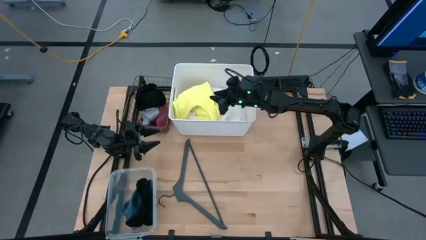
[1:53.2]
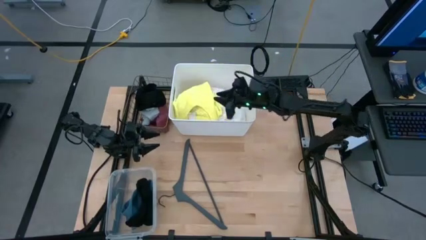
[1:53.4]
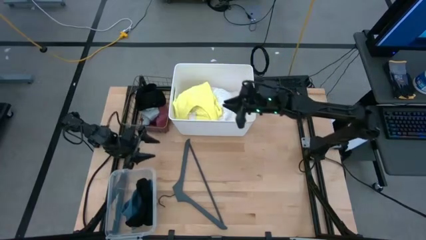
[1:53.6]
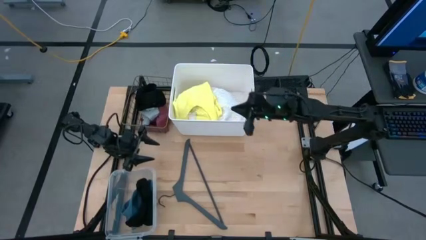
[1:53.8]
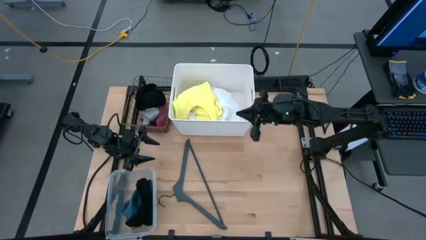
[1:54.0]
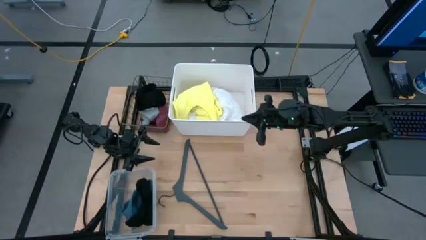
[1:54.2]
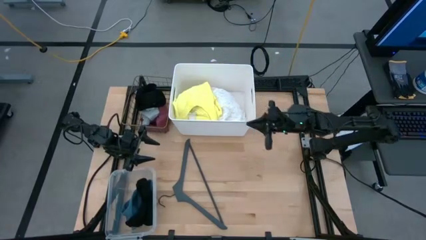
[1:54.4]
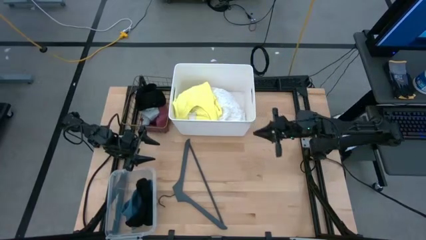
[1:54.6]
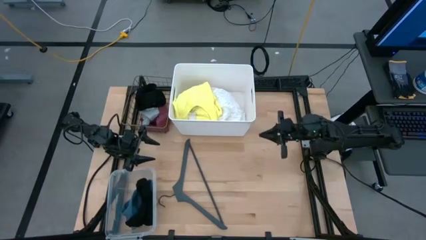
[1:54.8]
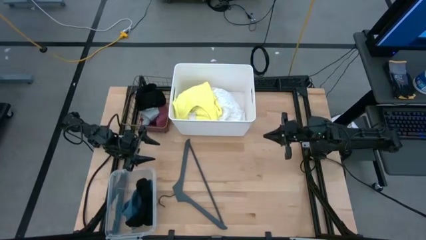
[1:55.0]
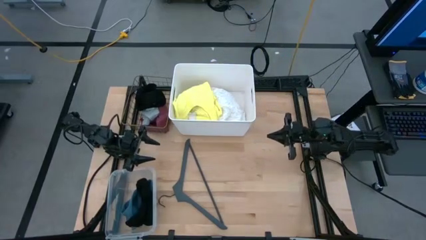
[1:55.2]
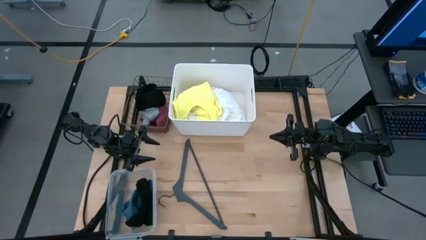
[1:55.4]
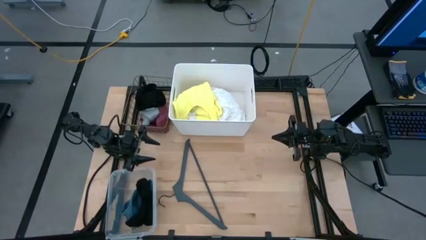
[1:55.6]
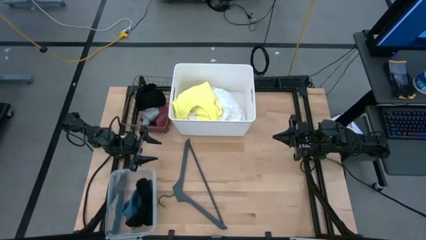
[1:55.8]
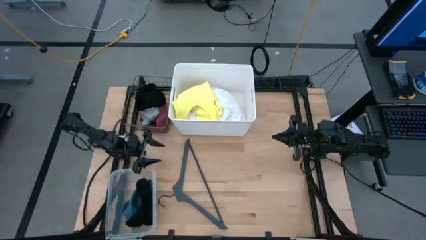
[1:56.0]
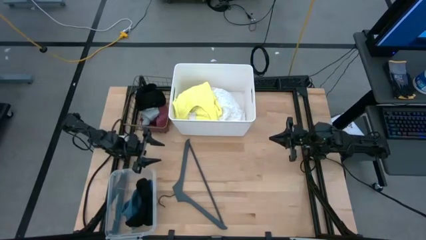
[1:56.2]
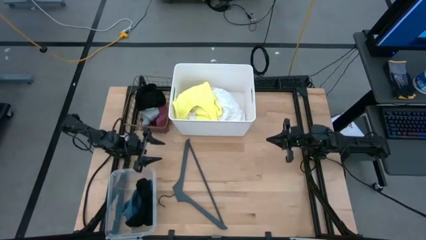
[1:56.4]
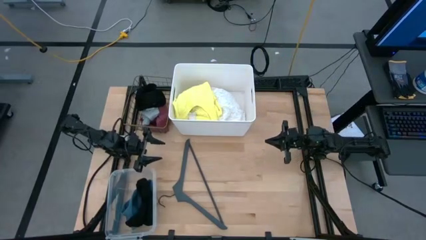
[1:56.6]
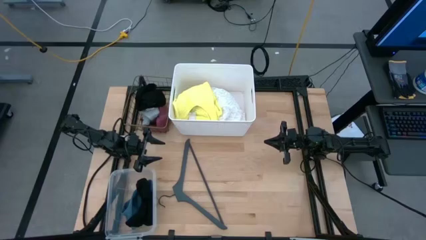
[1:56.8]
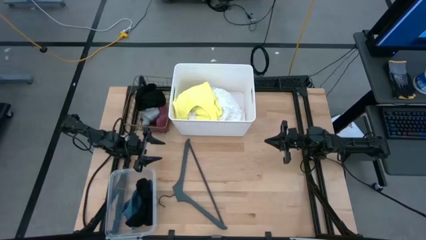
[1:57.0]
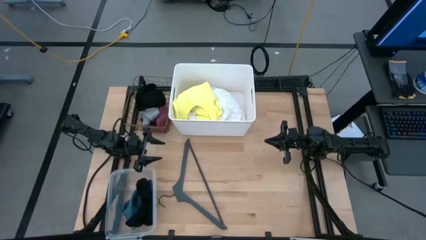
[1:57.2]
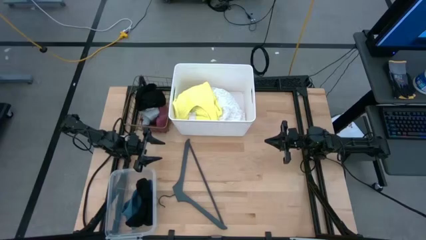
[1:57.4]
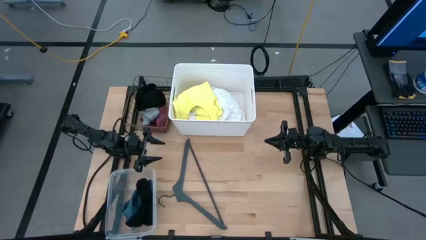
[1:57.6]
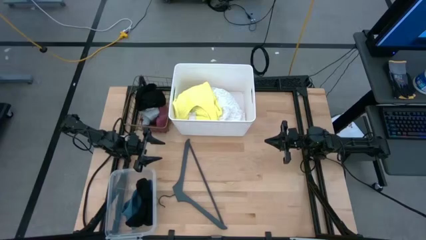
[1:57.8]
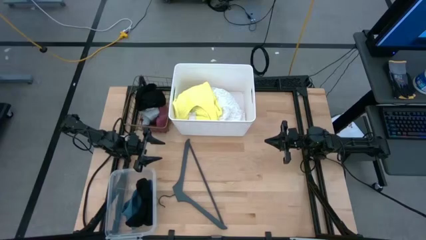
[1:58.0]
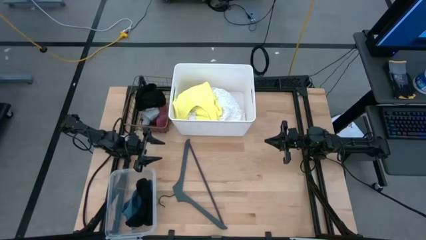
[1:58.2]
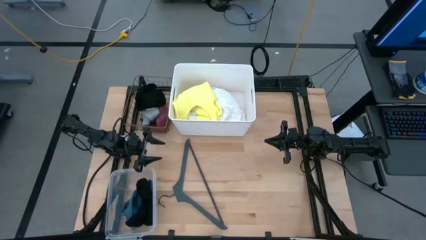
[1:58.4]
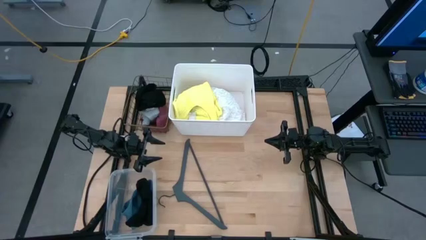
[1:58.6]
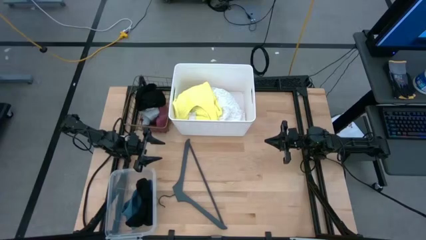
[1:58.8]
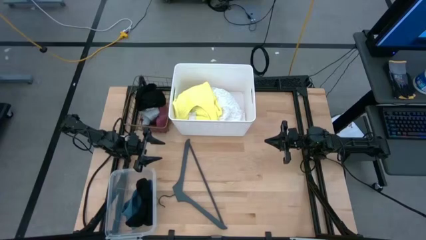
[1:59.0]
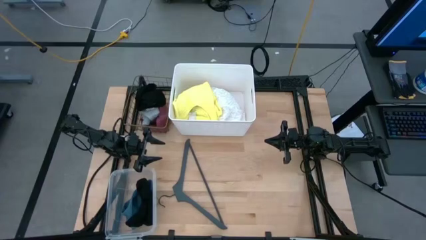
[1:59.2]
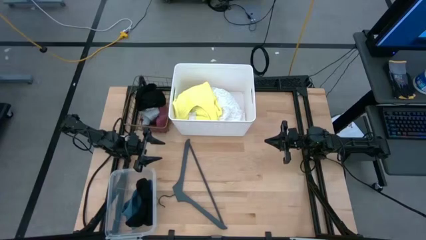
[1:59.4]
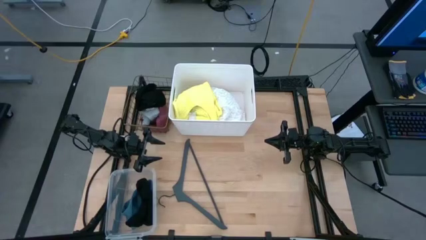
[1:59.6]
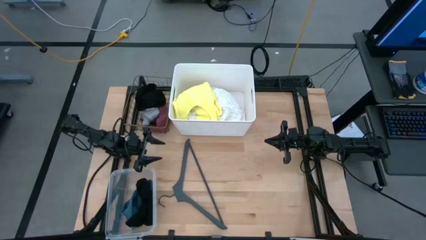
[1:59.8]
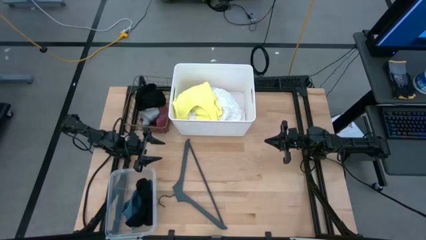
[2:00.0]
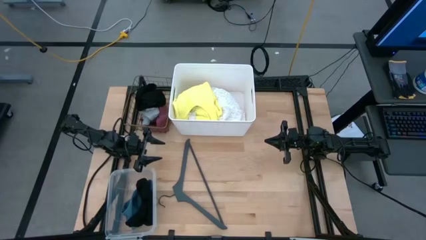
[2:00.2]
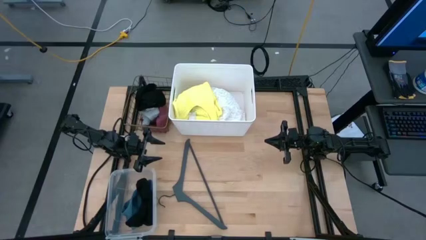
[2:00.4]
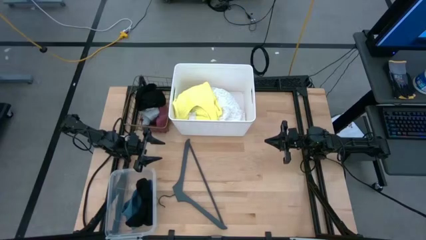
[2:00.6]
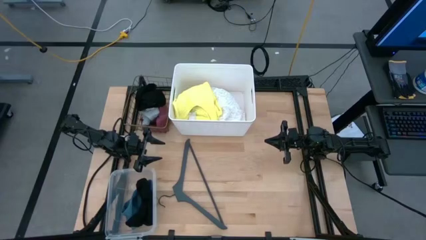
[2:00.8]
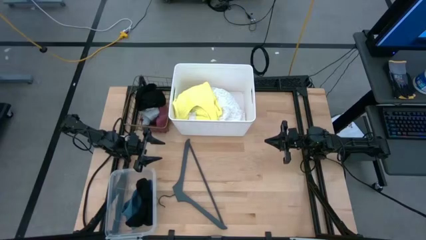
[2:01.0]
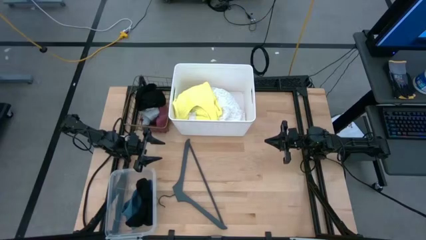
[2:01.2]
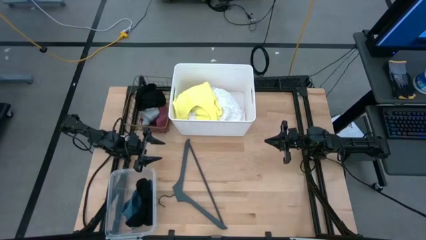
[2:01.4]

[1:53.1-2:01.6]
Task: Pick & Place Cloths
Return to Home Position

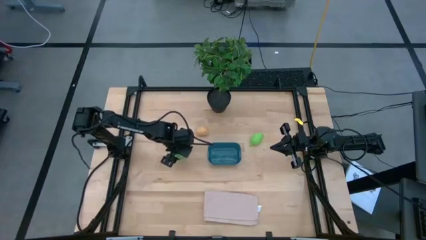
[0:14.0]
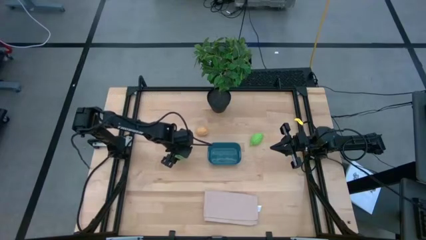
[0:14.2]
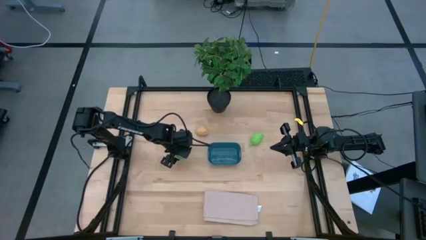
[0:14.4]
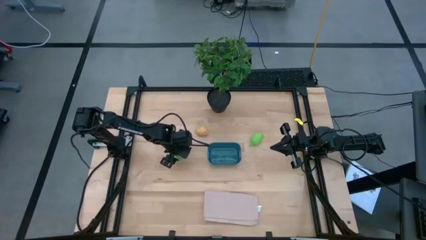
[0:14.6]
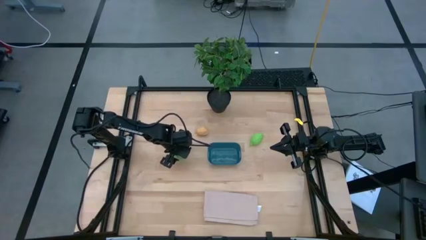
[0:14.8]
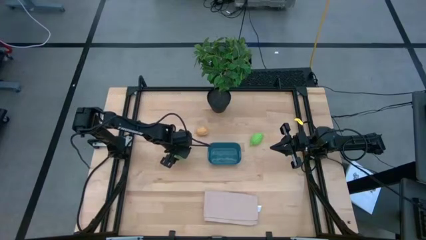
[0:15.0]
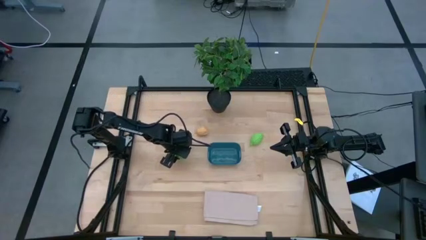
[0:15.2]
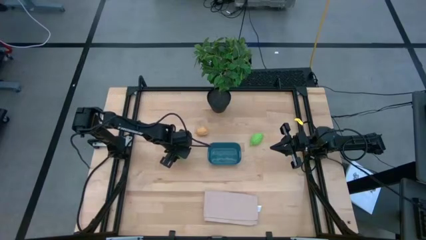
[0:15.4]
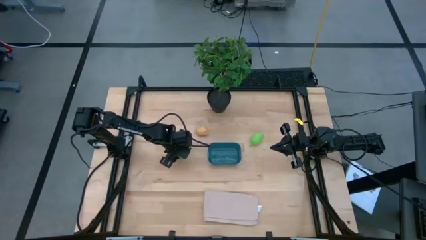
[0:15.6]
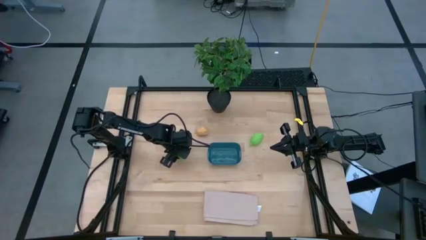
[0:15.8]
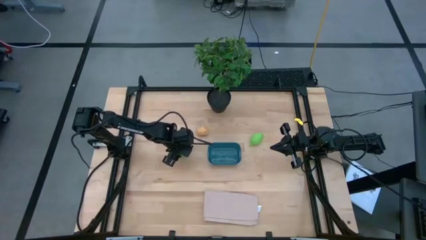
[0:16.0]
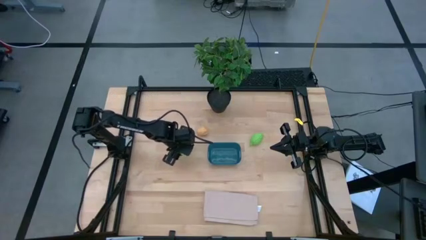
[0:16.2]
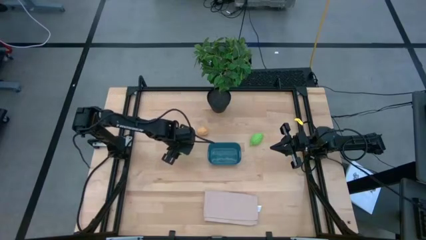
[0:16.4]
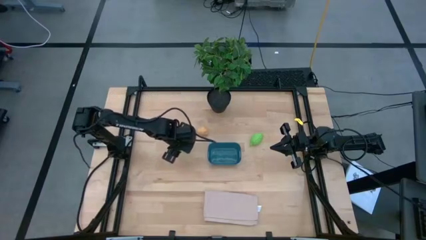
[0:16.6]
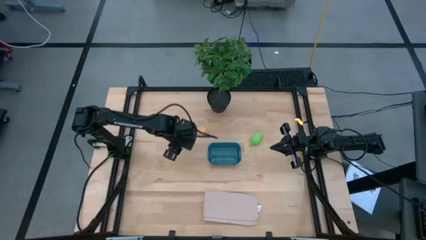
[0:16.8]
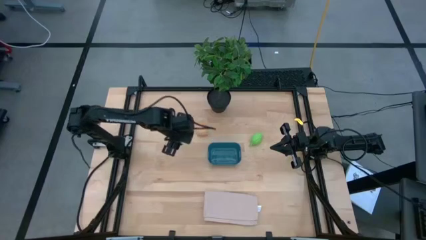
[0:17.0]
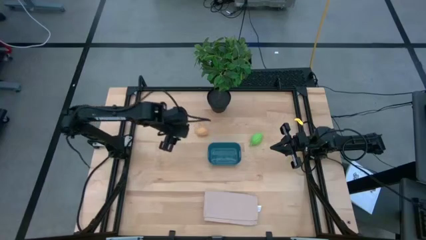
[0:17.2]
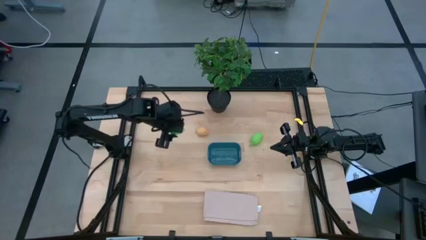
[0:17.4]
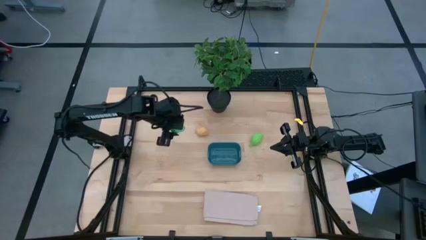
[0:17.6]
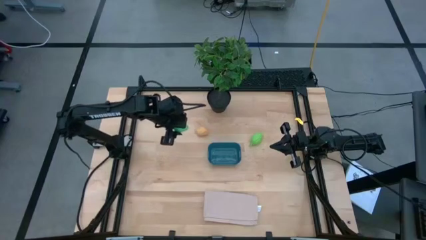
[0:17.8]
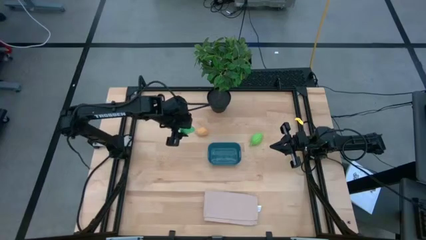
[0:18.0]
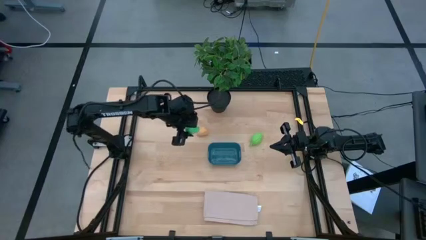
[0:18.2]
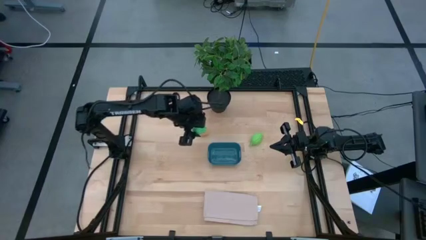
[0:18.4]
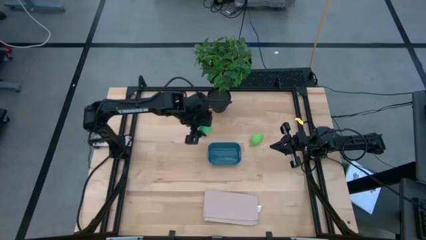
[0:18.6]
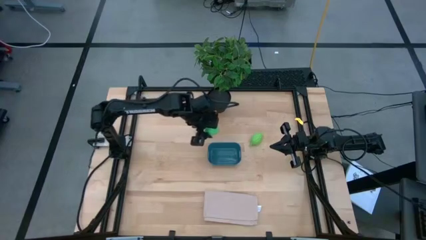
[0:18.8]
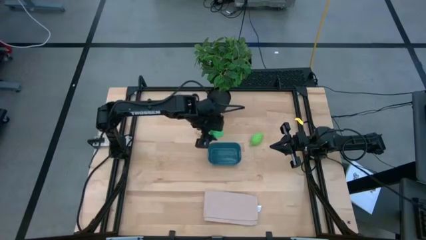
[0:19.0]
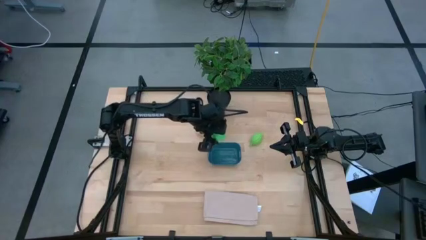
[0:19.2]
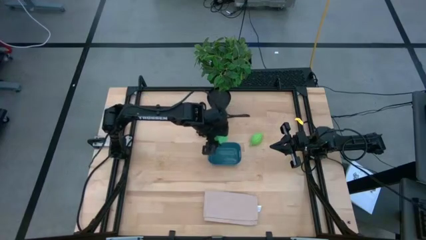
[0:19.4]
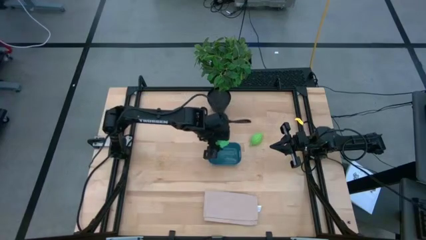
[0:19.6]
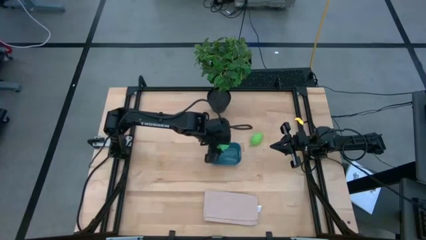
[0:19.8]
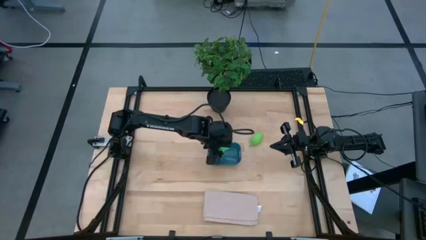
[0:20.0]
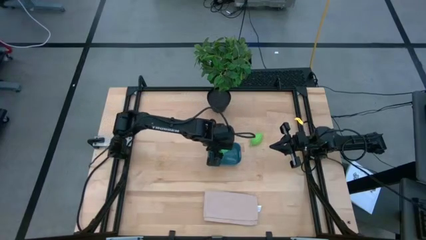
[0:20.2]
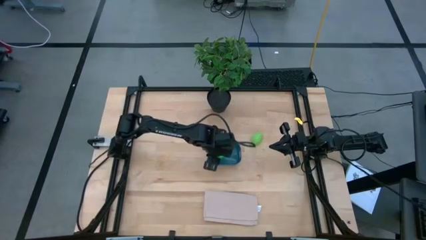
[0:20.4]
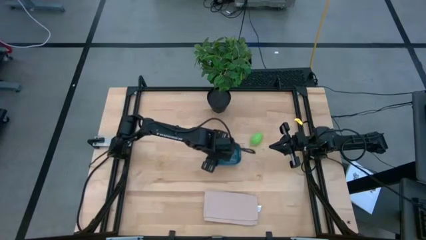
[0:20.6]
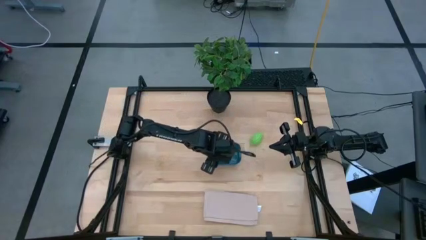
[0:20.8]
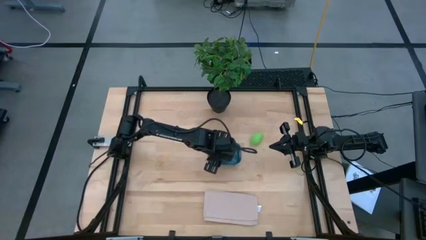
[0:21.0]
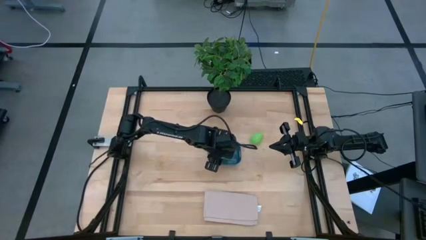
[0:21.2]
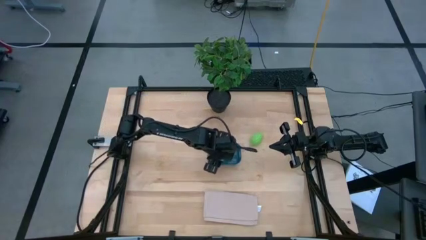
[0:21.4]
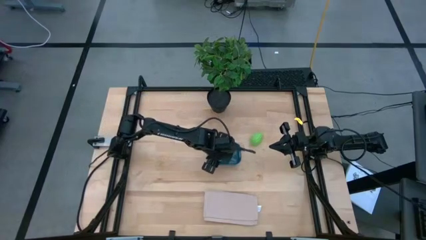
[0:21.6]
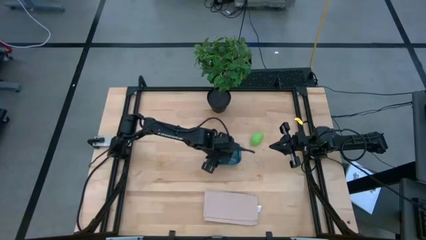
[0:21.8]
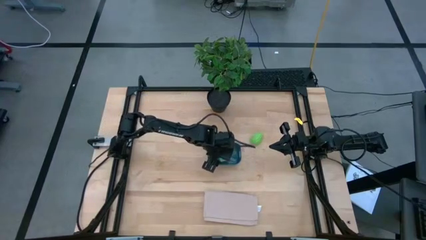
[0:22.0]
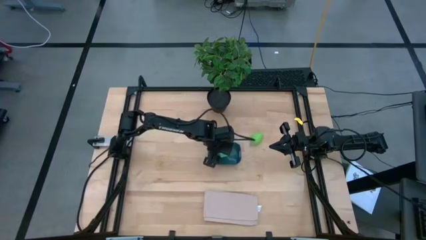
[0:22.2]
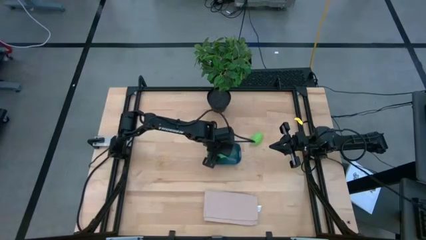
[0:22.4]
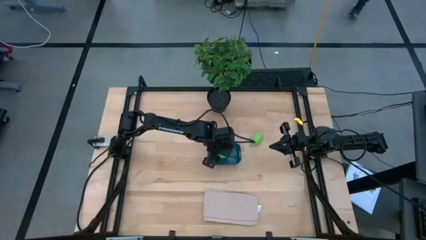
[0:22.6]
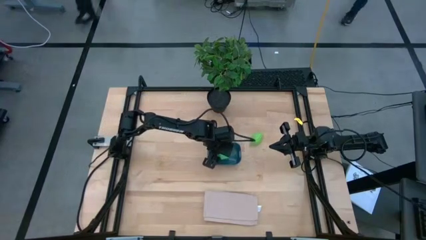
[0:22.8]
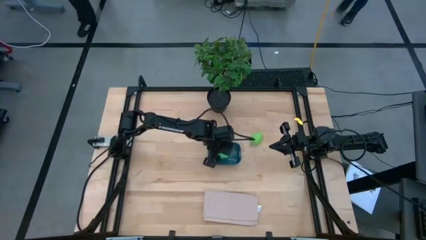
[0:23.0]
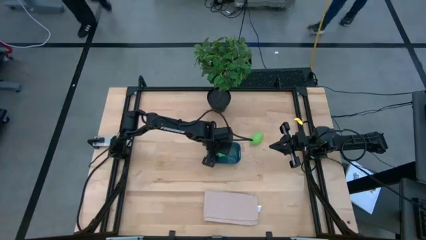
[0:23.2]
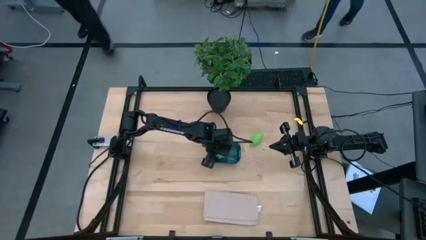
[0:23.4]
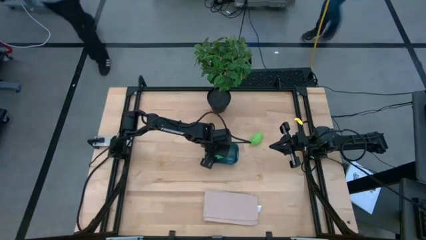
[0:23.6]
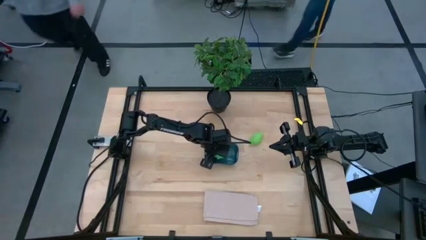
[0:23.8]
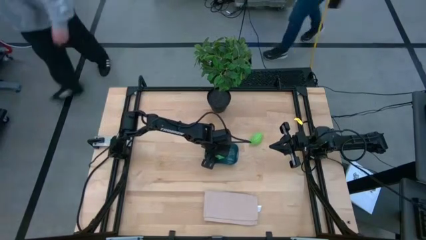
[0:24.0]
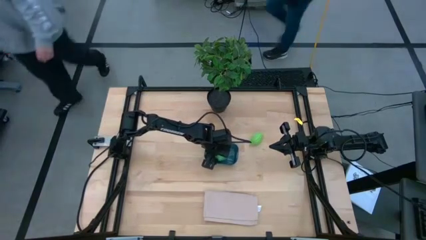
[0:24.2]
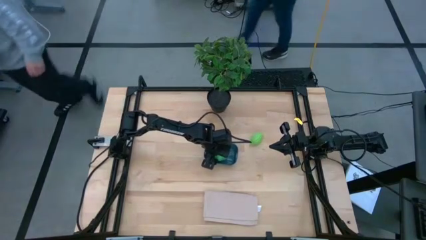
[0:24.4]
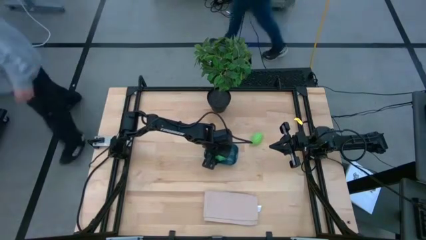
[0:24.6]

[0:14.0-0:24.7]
Task: Pick and placing Produce into tupperware
Put the avocado into the blue container
